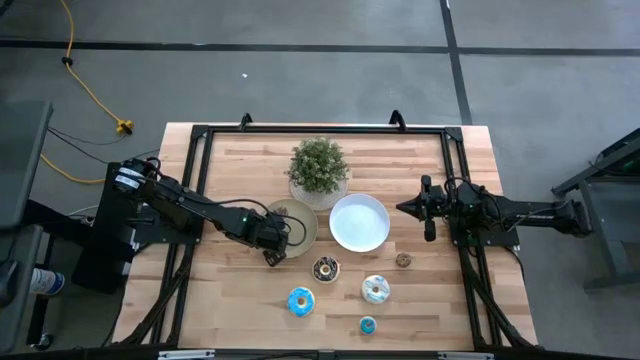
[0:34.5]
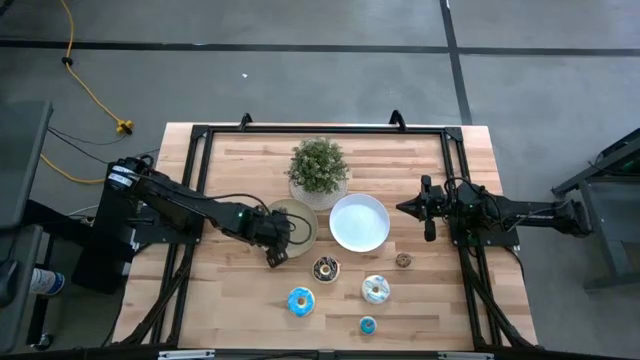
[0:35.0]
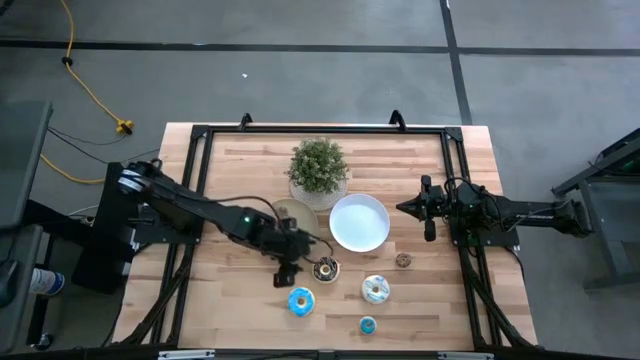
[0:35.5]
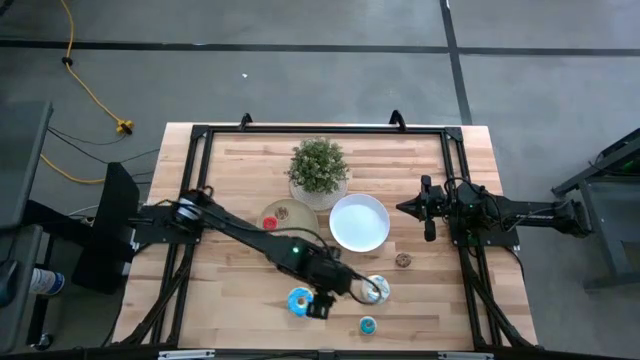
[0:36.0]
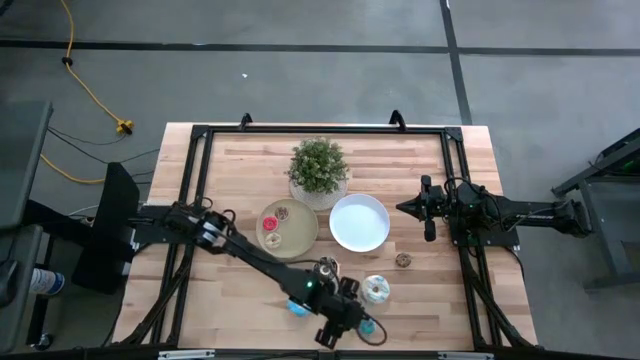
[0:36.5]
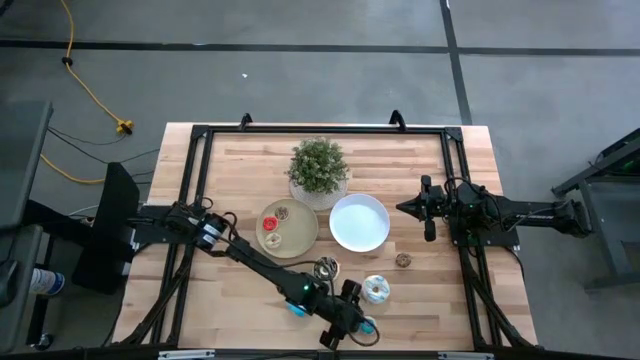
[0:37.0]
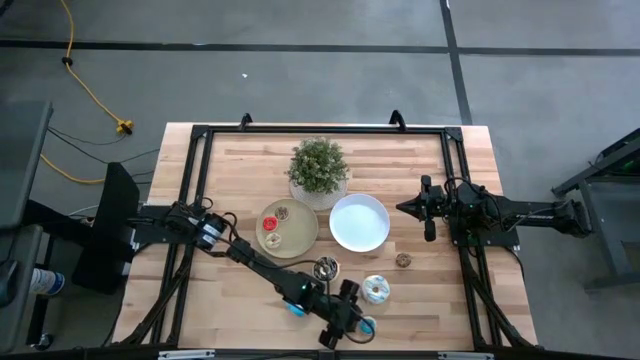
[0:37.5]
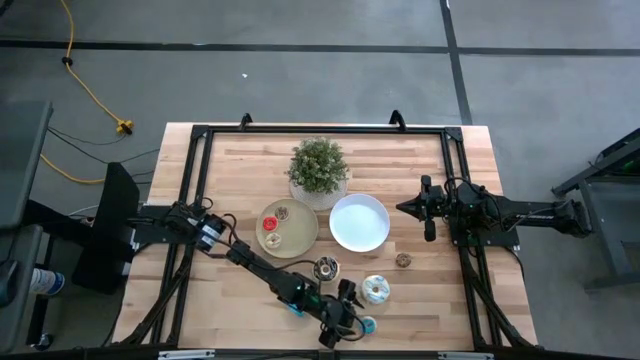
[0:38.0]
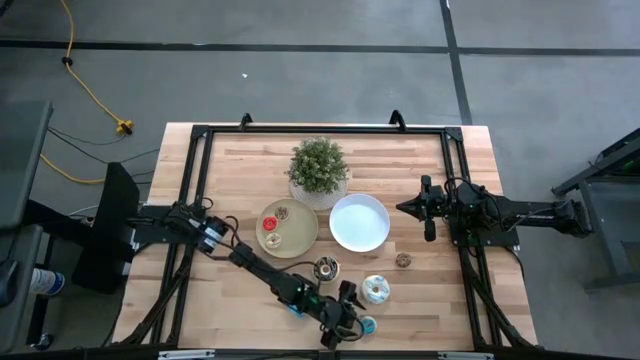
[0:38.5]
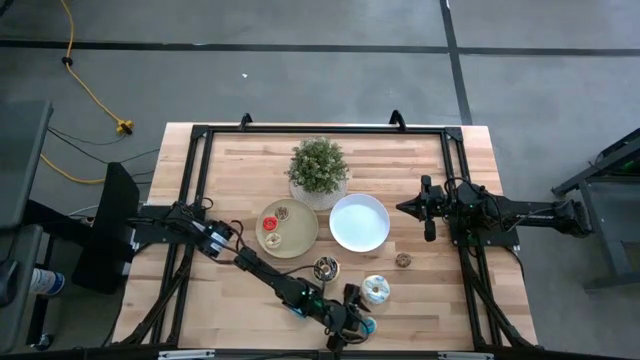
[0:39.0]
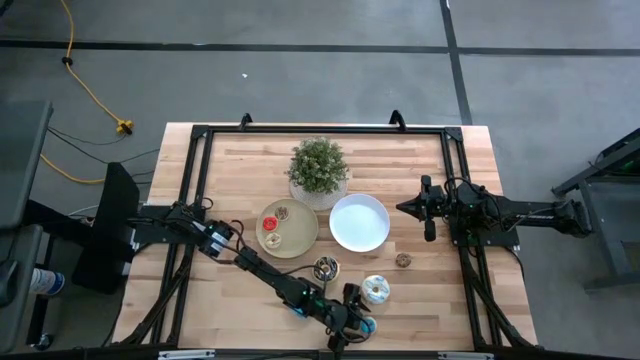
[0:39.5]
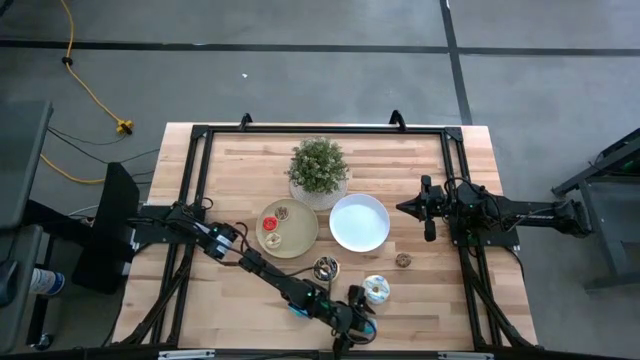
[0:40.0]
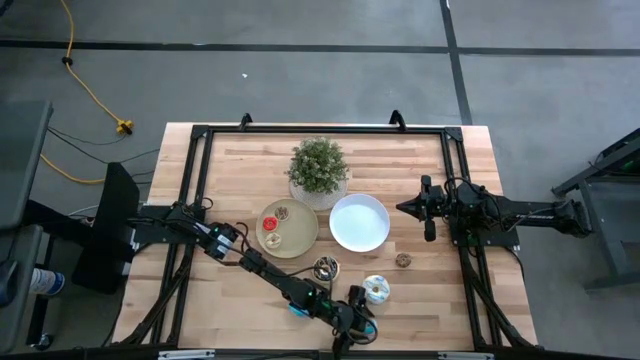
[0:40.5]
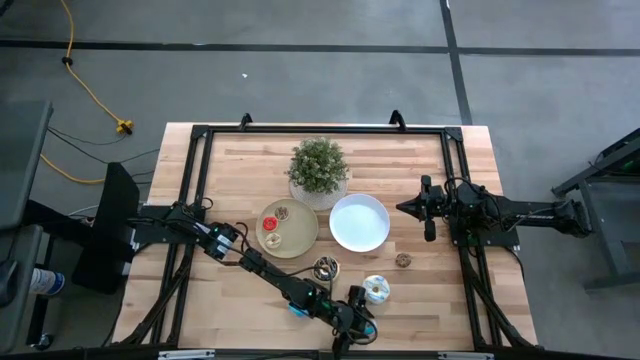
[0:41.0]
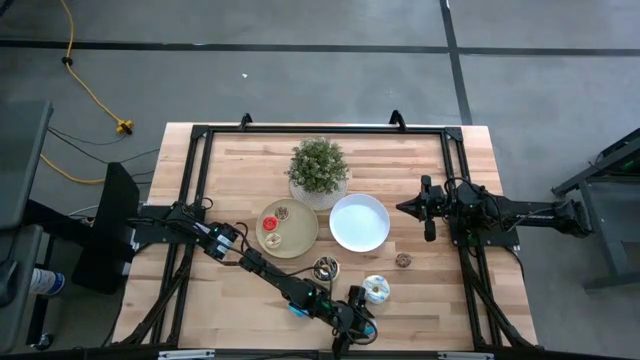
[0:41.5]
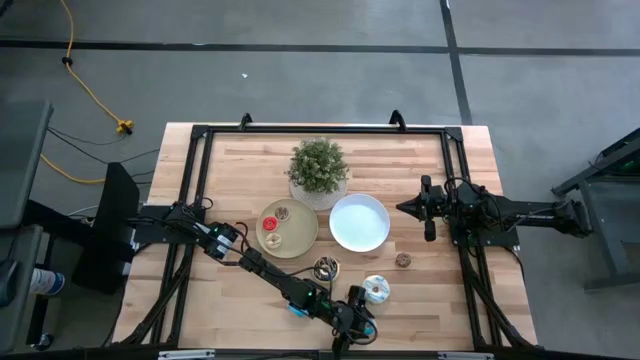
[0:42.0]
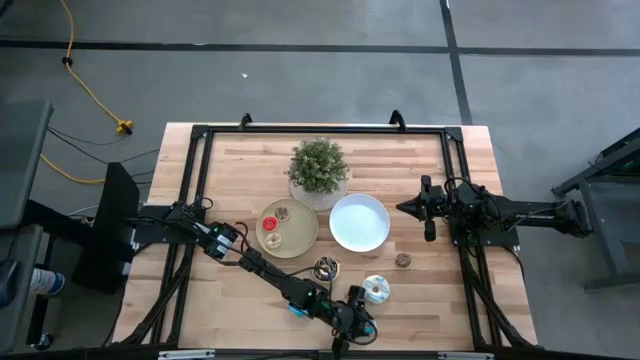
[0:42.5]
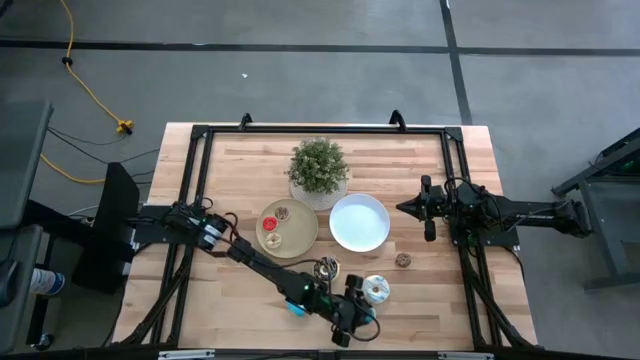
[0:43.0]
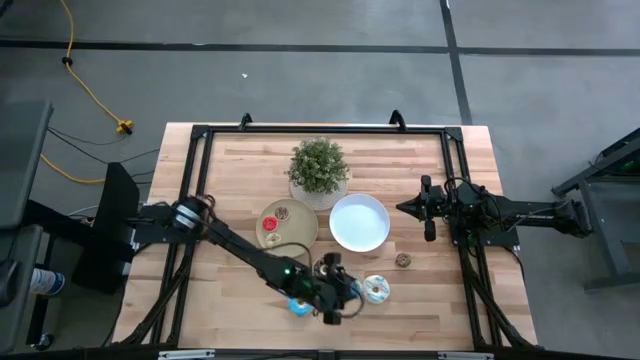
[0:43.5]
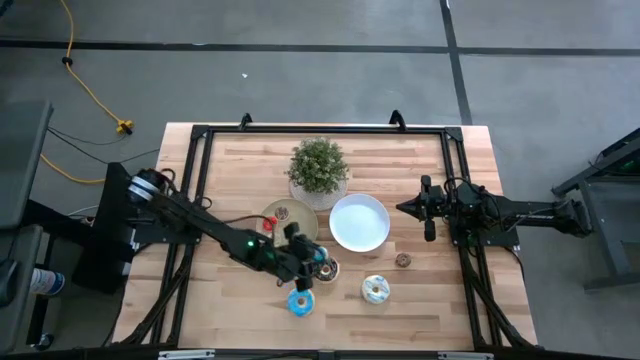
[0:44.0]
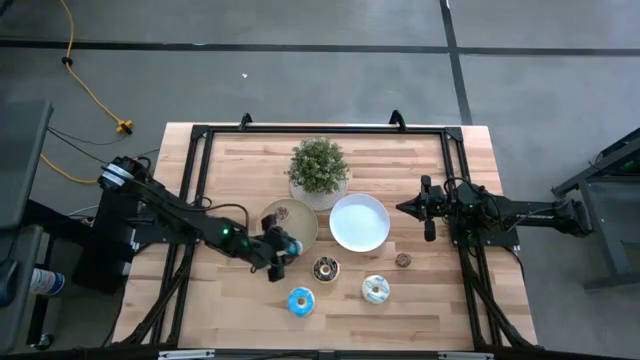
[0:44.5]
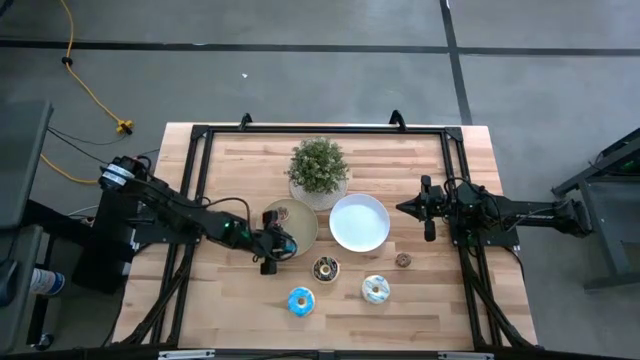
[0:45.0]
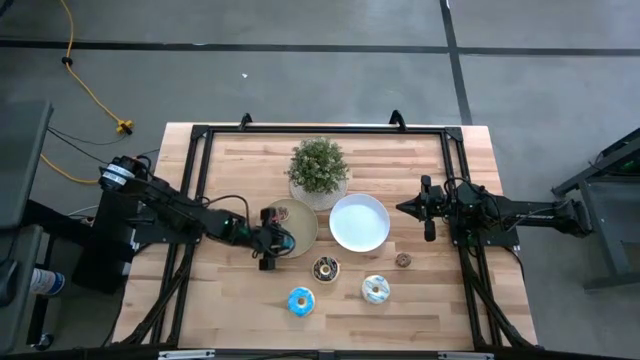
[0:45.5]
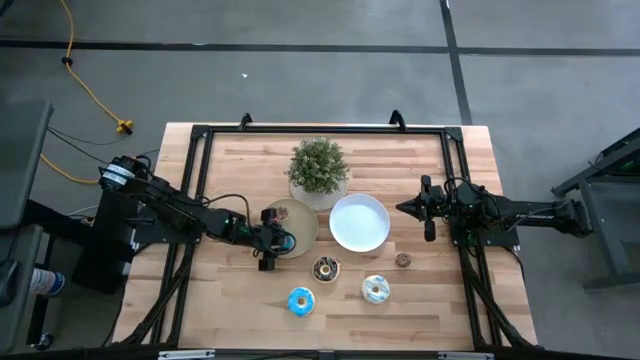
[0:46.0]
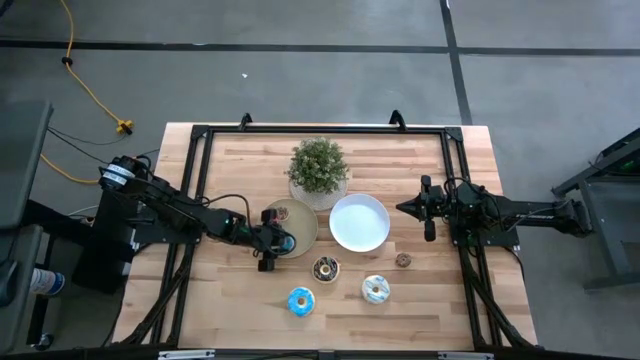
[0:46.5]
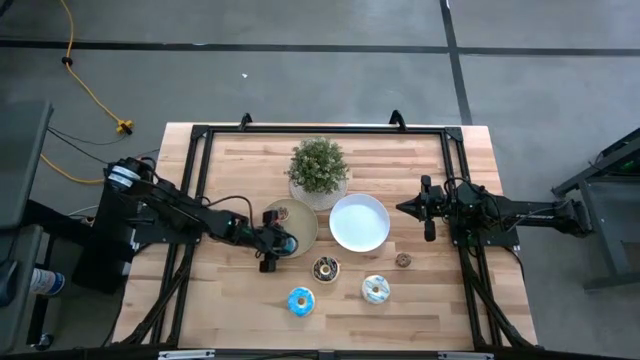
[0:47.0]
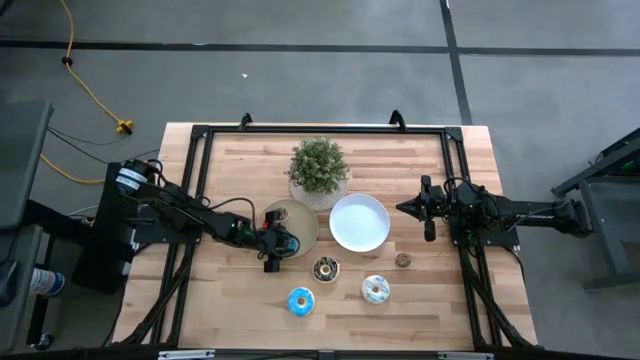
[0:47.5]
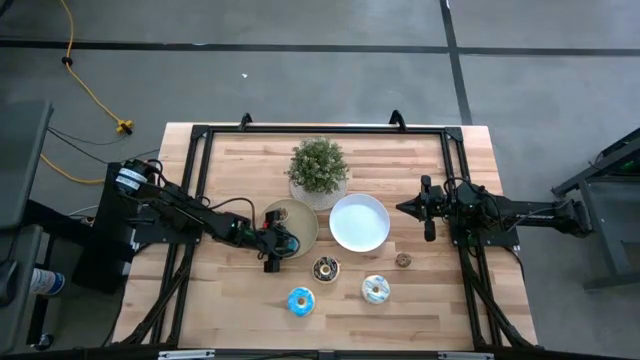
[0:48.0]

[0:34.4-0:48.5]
Task: Pick & Place donuts
Put the small blue donut on the brown plate

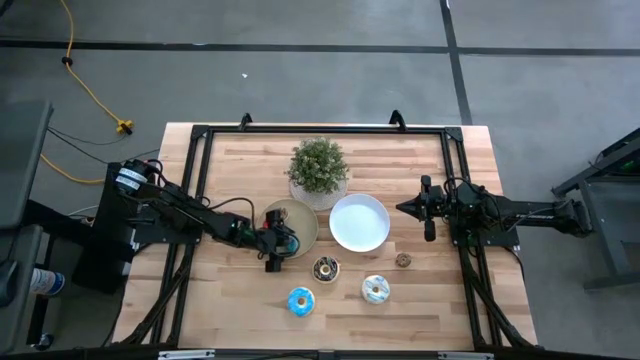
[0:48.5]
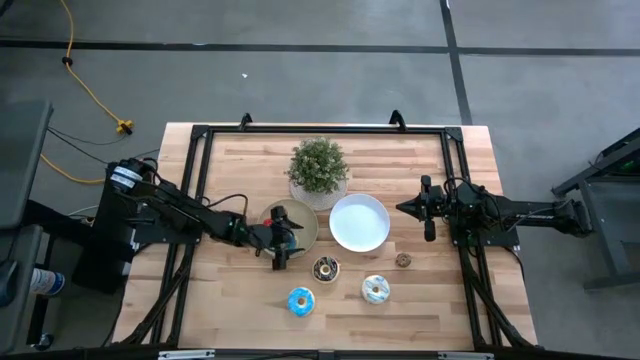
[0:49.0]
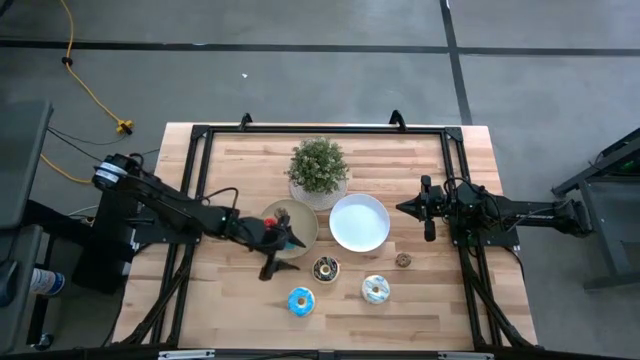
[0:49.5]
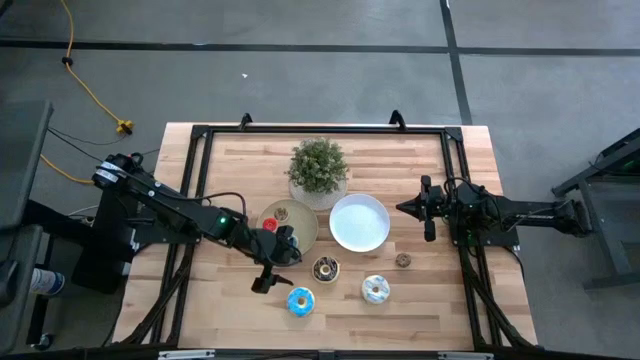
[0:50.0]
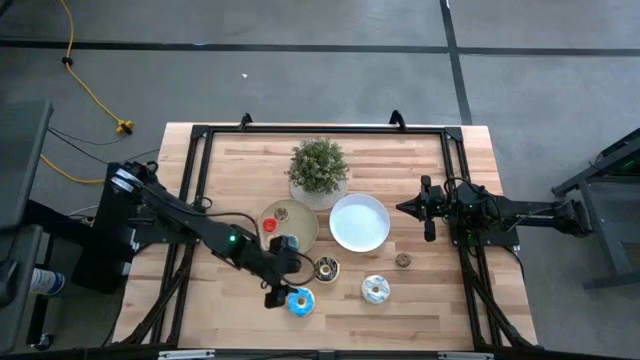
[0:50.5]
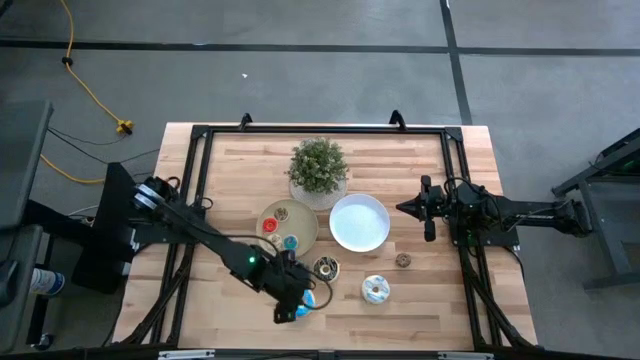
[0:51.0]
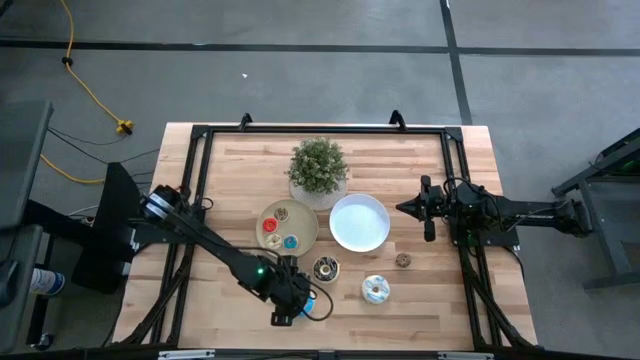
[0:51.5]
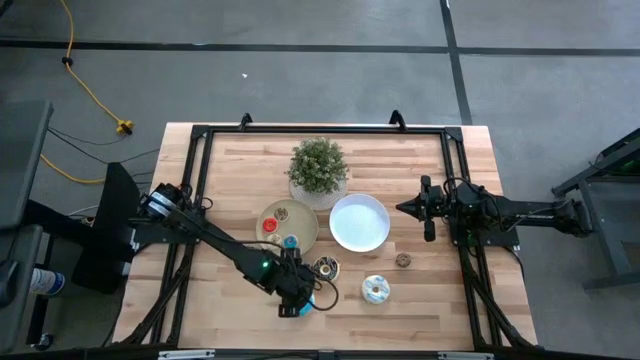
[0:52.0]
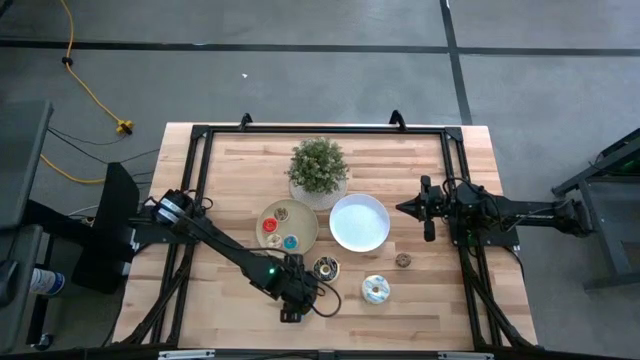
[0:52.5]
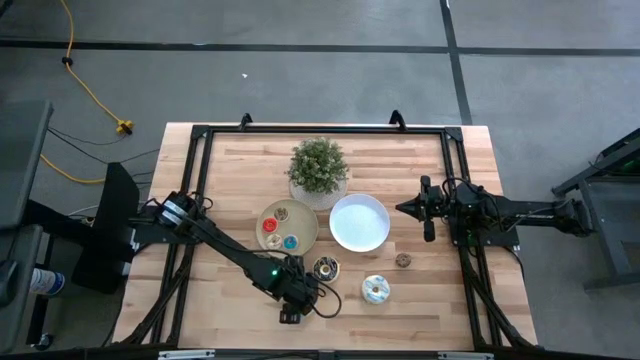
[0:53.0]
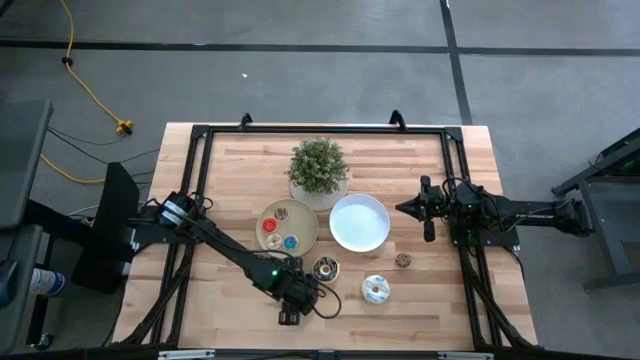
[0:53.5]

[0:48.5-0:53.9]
Put the large blue donut on the white plate

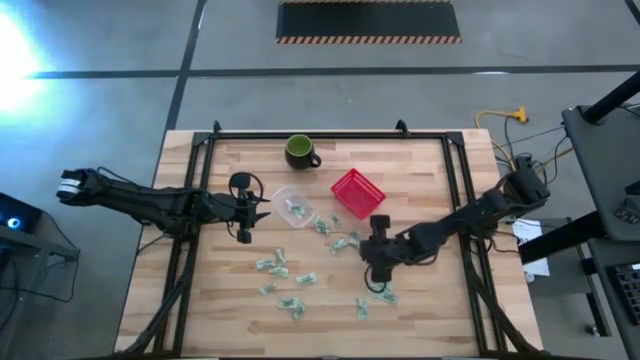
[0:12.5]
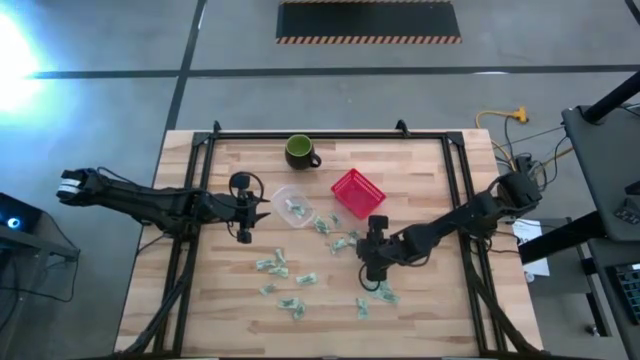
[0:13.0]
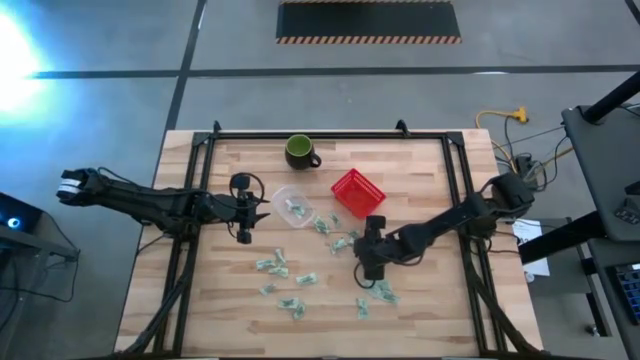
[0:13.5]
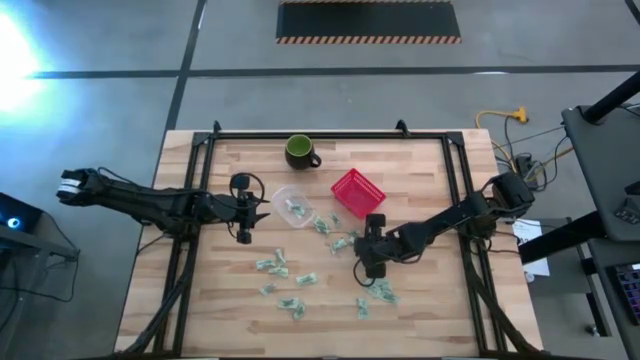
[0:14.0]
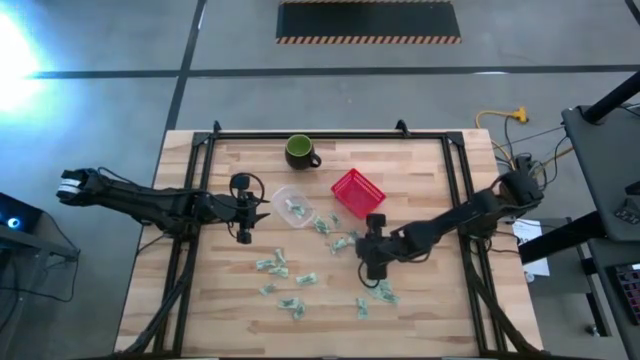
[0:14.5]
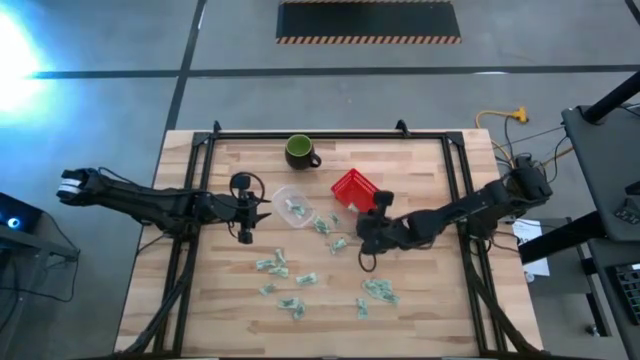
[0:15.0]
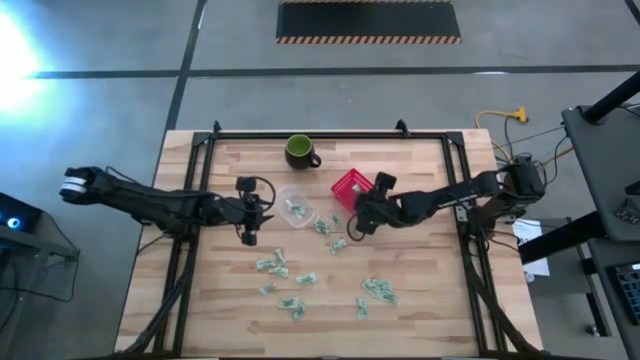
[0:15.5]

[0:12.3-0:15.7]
Task: Pick and place items into bin
Put the stevia packet into the red bin
